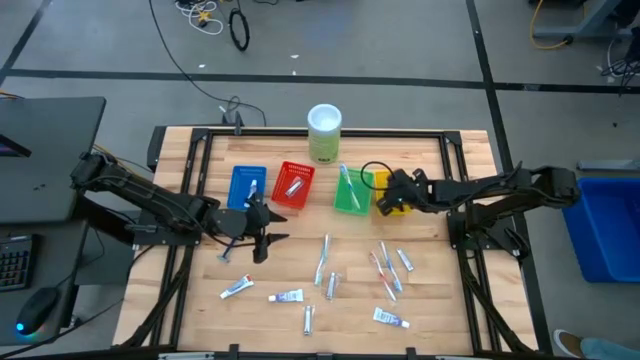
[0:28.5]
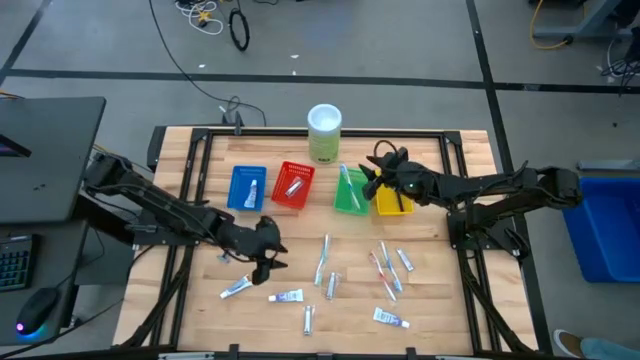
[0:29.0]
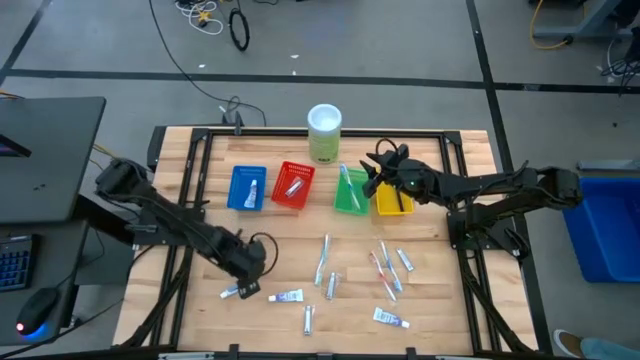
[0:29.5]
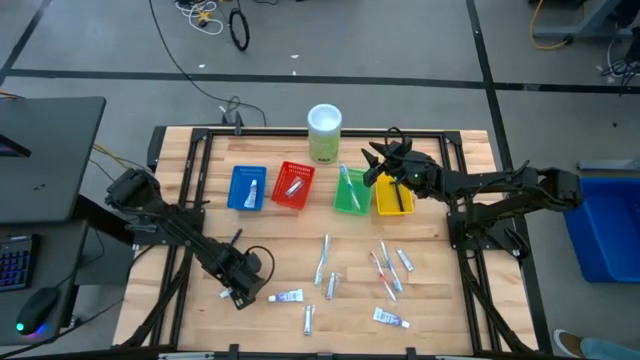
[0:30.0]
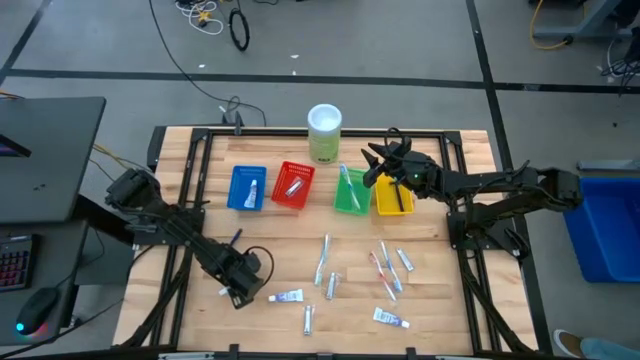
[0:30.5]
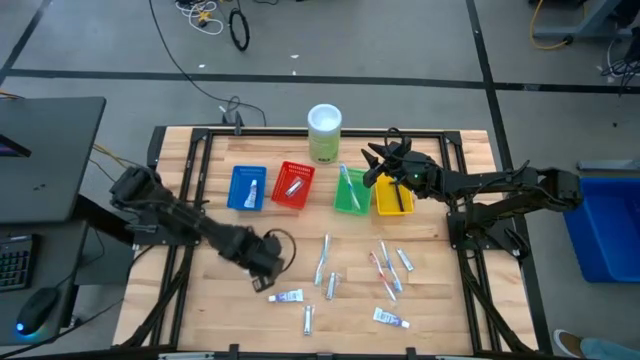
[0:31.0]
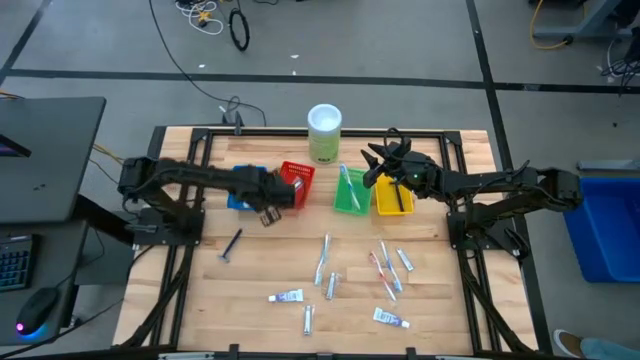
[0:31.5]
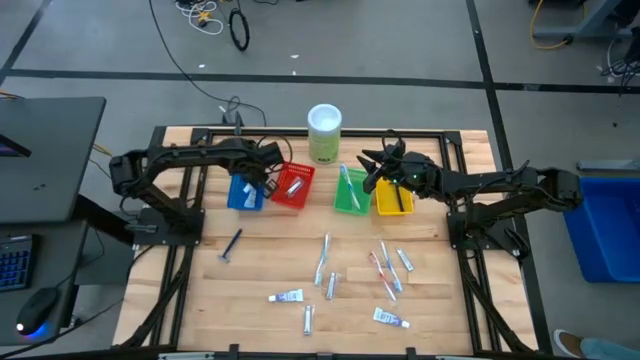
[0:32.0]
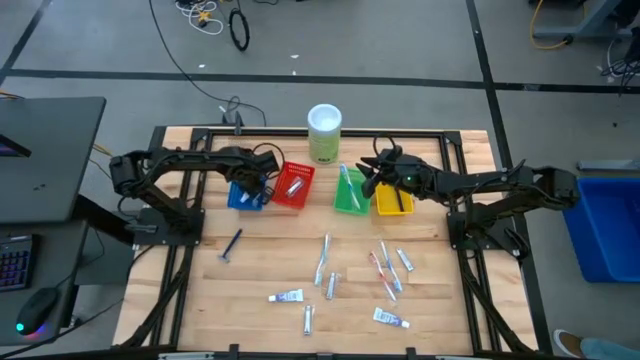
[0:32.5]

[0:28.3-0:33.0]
Task: Pick & Place Travel size toiletries
Put the white toothpaste into the blue basket

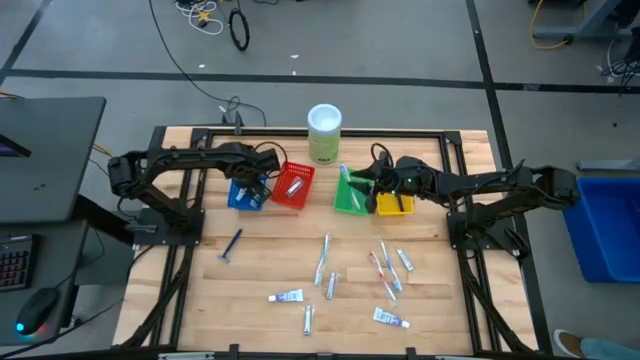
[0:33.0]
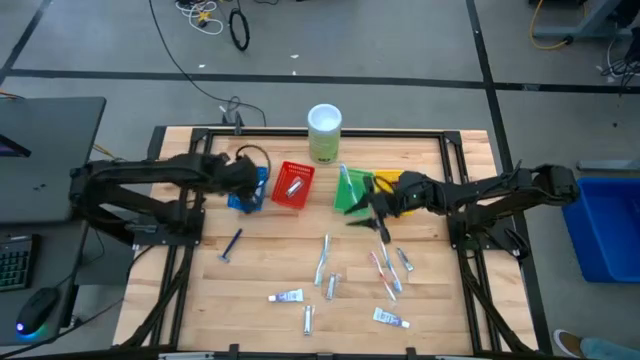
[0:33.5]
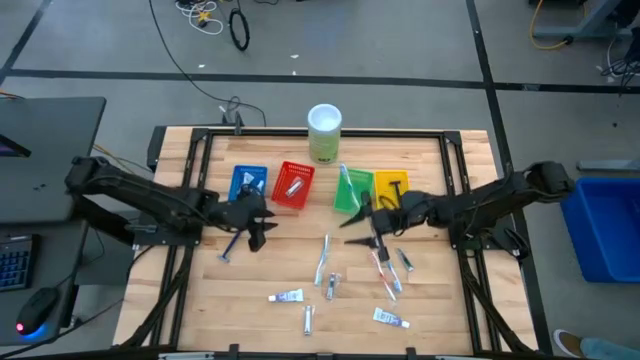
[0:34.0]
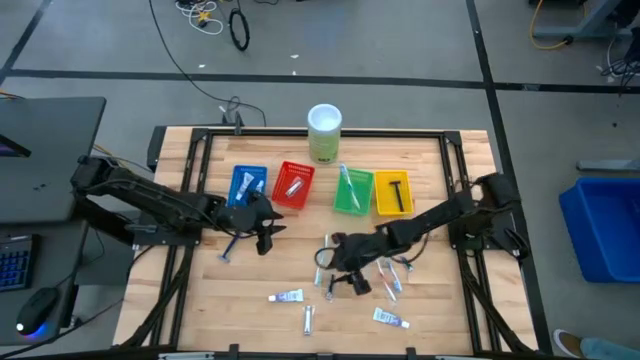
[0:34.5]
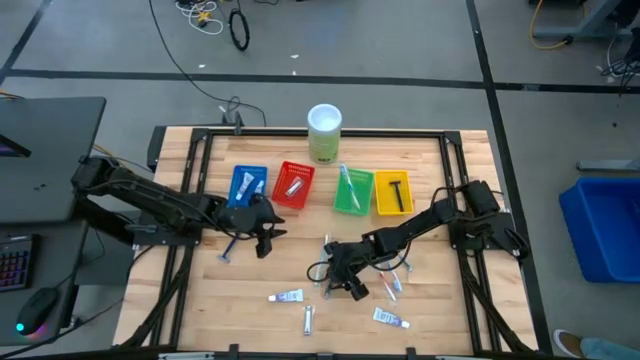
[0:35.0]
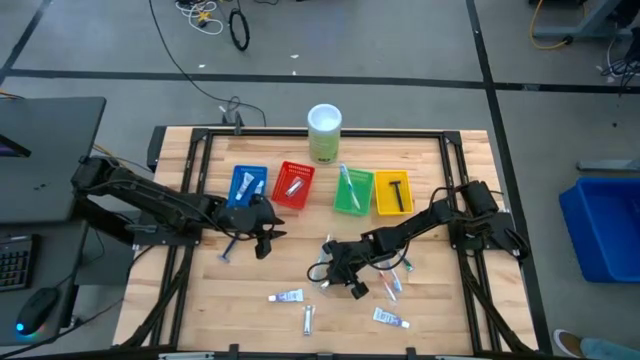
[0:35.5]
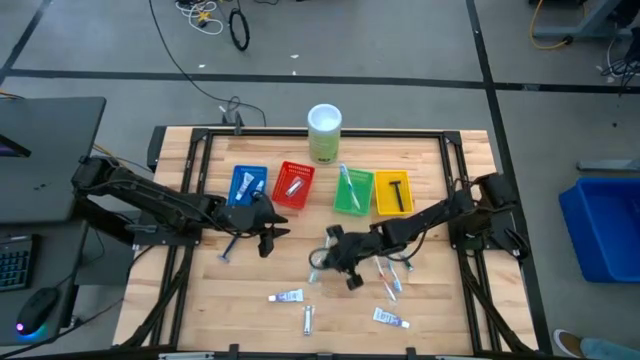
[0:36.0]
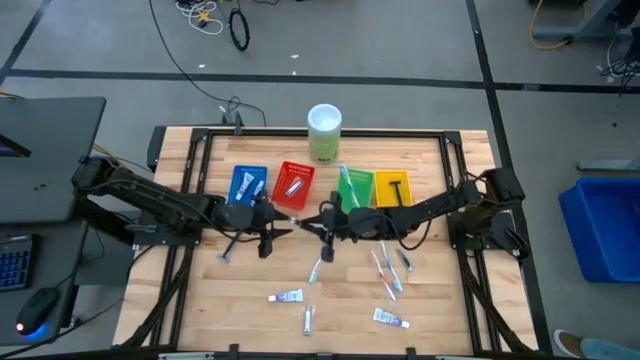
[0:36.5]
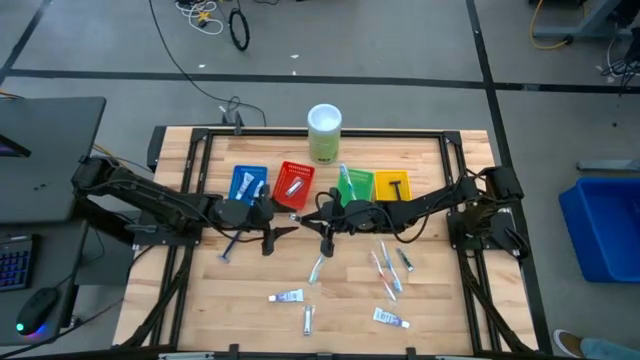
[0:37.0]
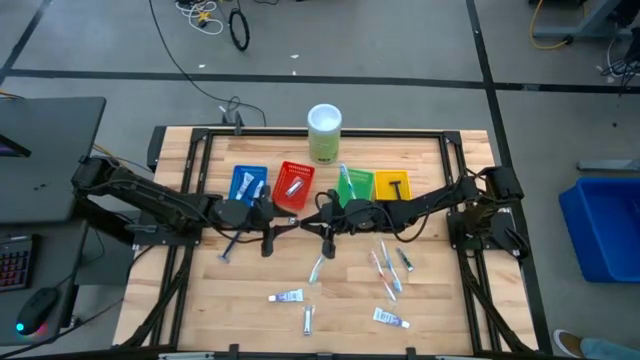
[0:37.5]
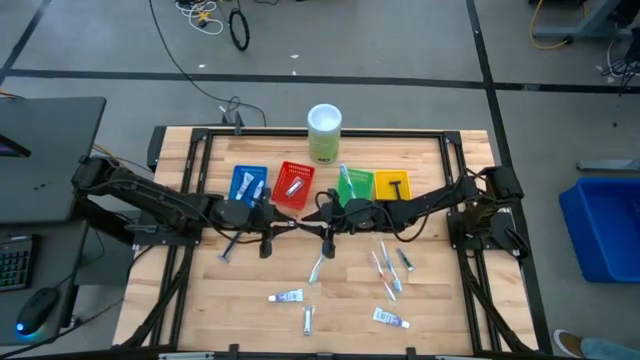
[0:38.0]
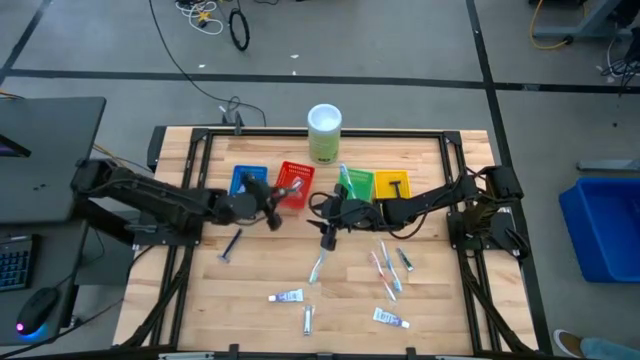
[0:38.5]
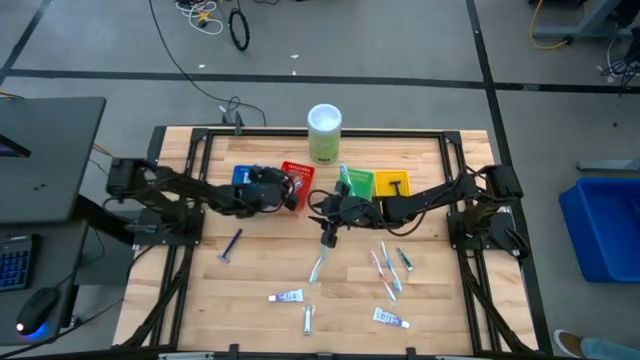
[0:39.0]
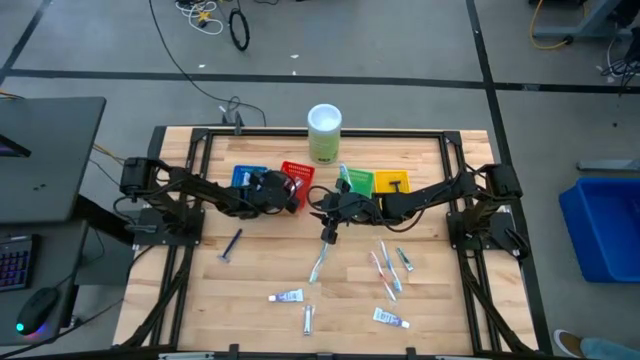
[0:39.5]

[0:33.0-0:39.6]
Put the silver nail cutter into the red basket

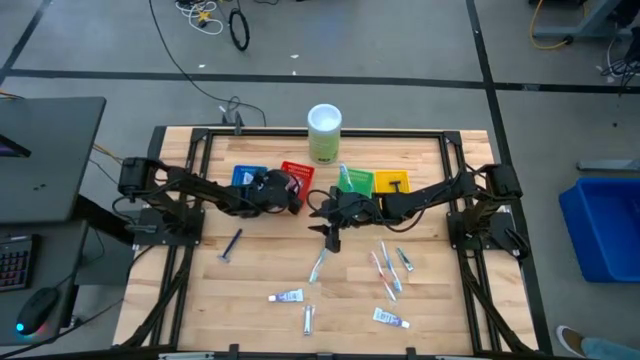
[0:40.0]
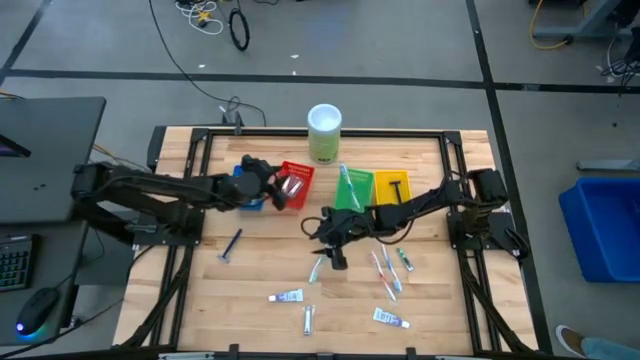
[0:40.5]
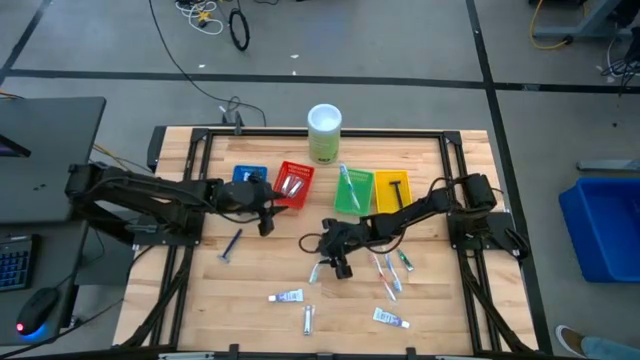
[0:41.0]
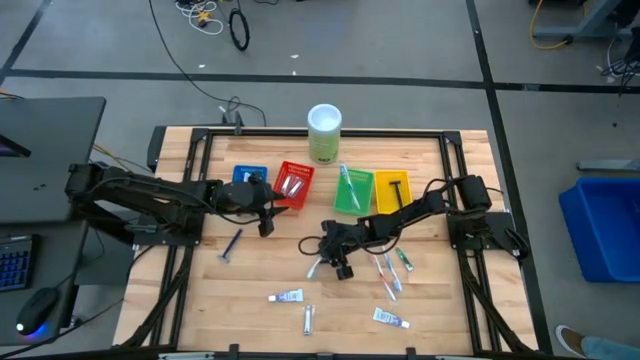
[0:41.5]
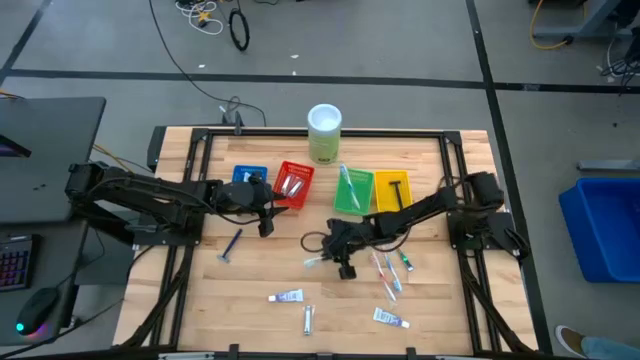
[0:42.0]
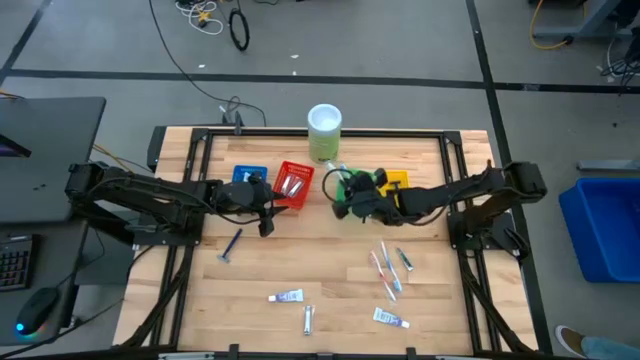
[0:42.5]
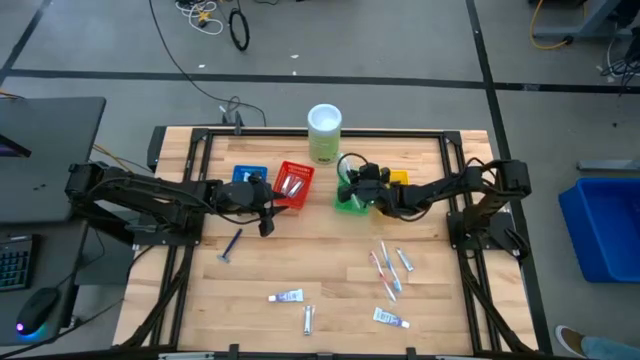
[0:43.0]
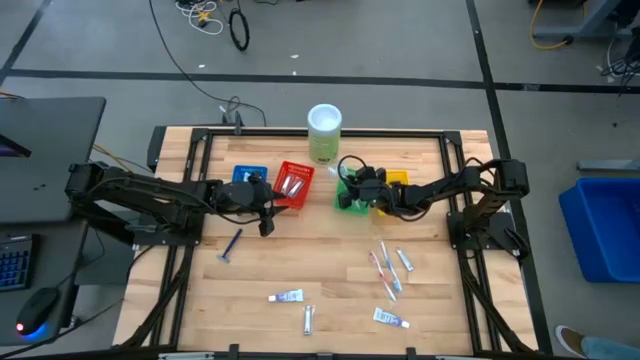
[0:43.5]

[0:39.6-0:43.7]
Put the green toothbrush into the green basket

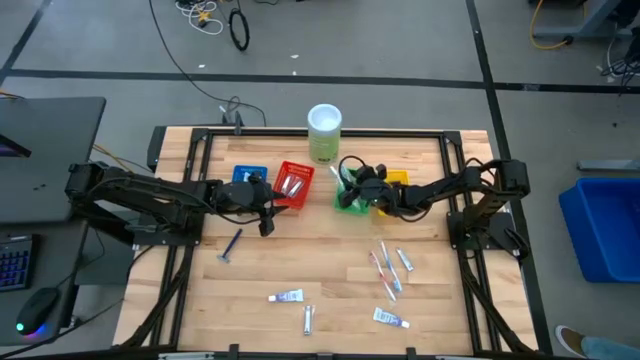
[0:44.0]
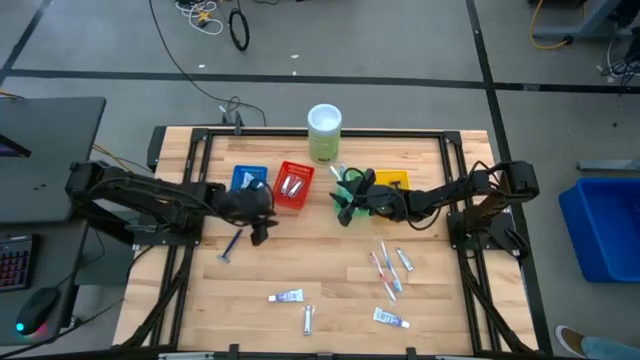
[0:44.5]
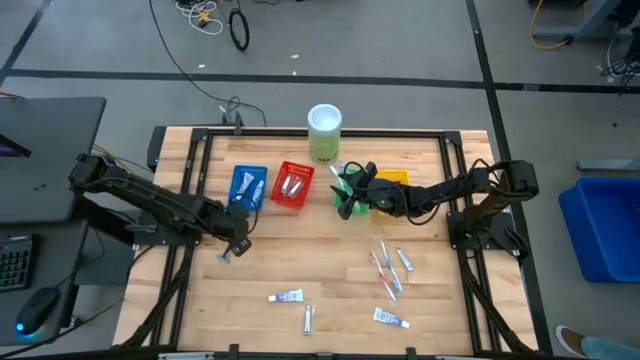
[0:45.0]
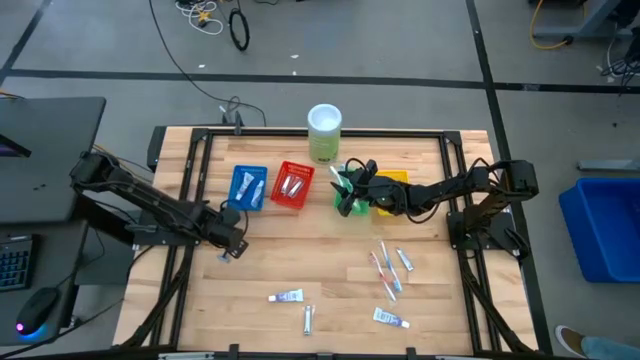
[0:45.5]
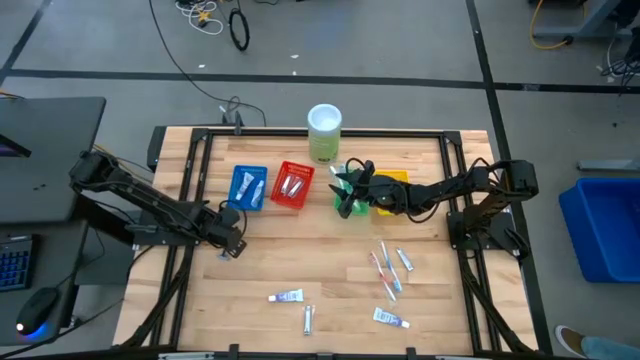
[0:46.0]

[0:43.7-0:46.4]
Put the blue razor into the yellow basket

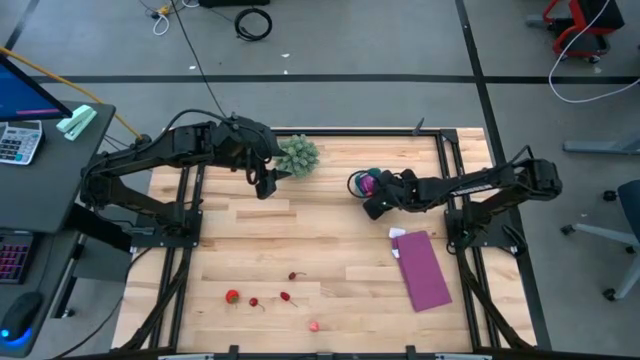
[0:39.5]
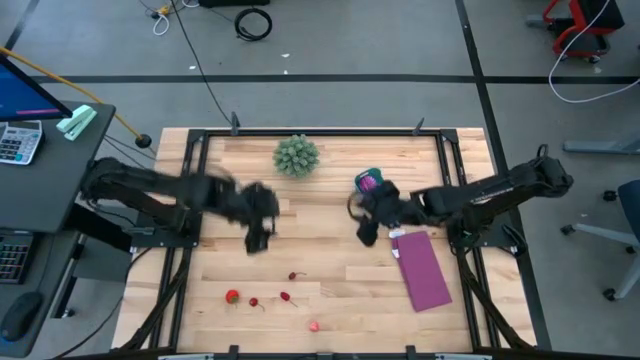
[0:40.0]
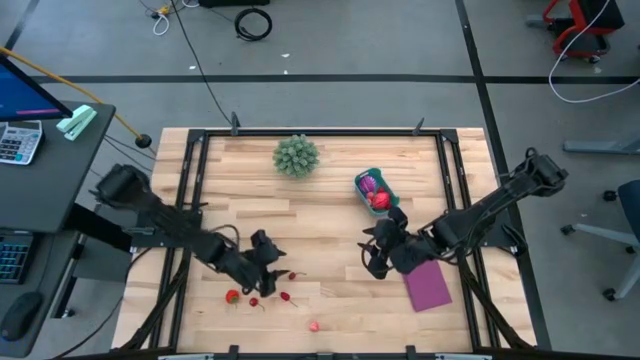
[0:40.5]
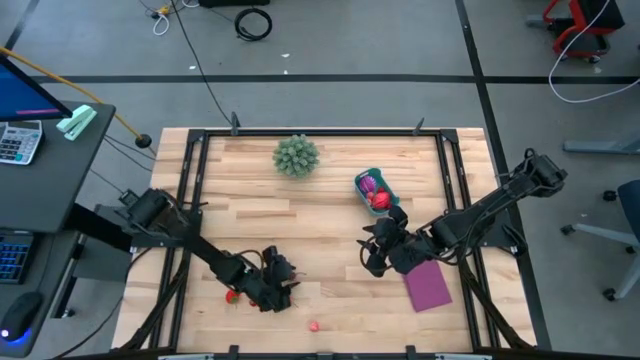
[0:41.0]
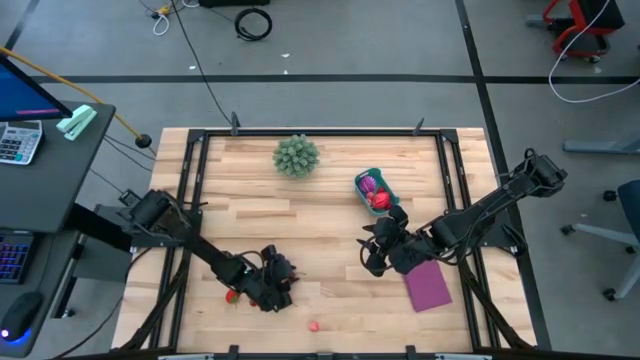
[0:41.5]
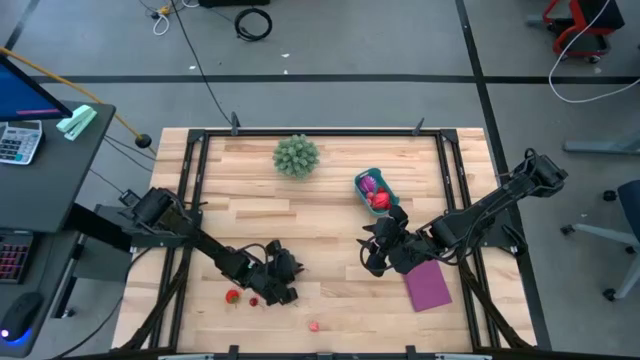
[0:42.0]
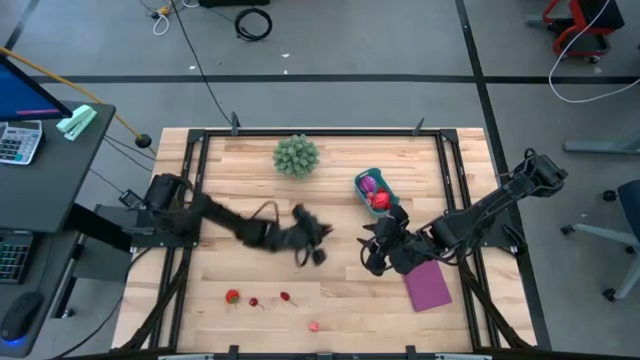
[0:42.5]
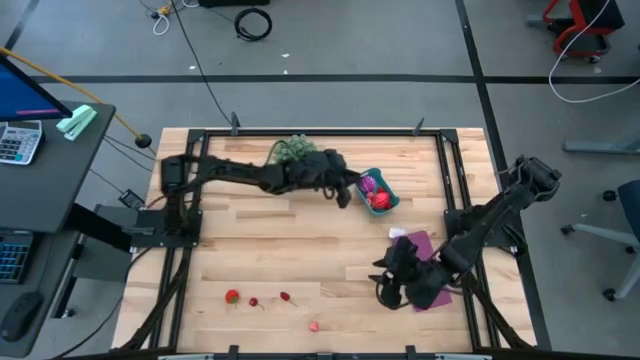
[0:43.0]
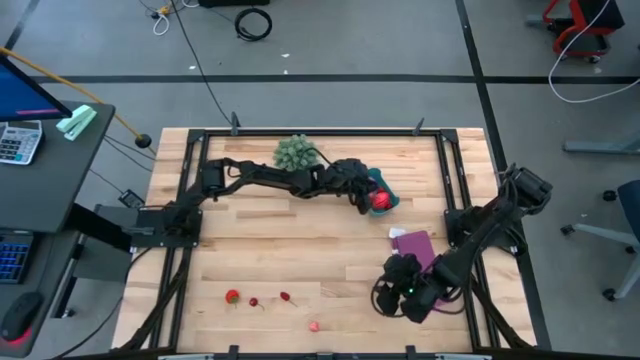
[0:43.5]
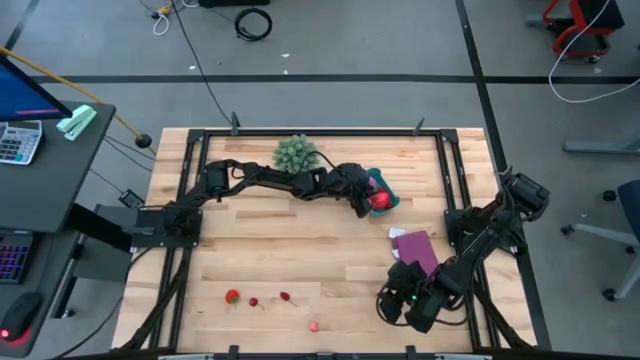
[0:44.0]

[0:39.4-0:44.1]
Task: Pick and placing Produce into tupperware
Put the red cherry into the blue bin
